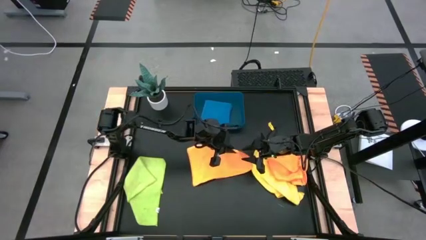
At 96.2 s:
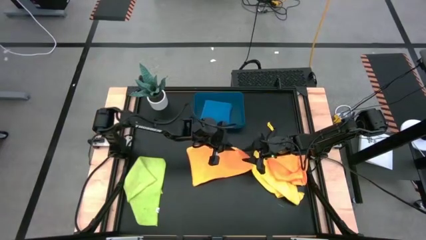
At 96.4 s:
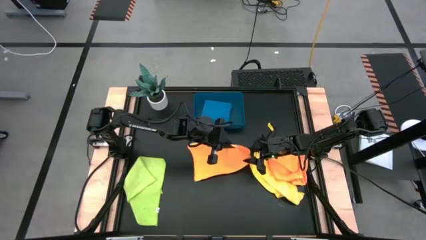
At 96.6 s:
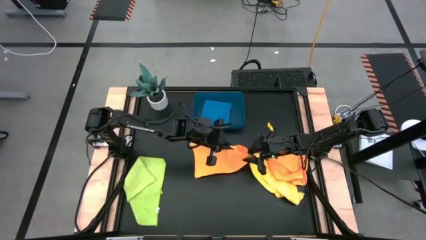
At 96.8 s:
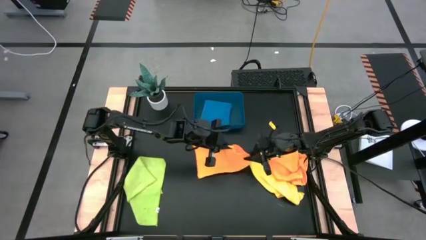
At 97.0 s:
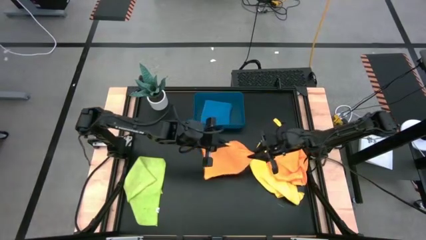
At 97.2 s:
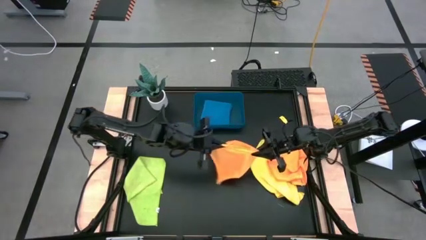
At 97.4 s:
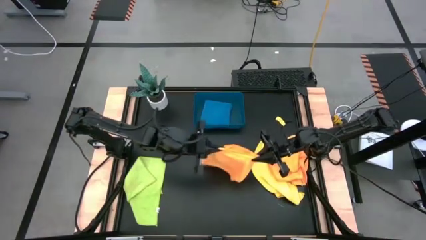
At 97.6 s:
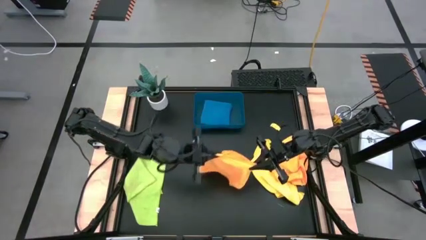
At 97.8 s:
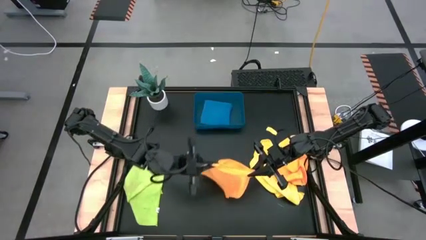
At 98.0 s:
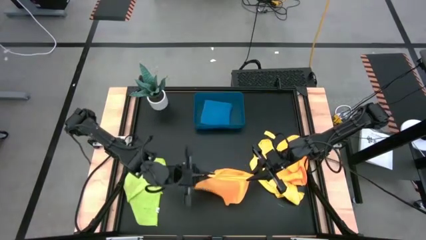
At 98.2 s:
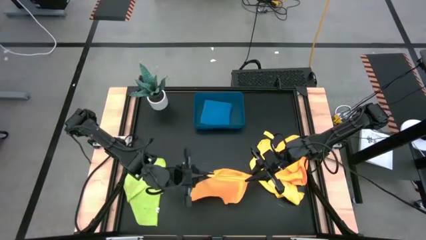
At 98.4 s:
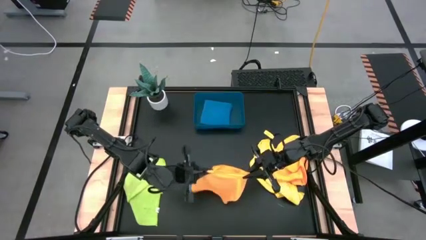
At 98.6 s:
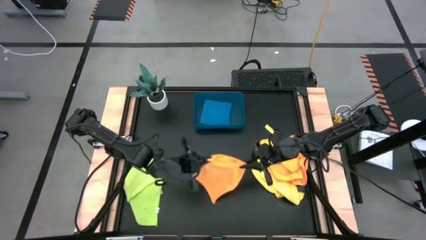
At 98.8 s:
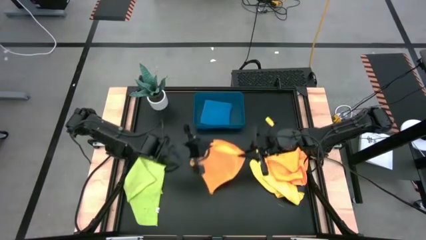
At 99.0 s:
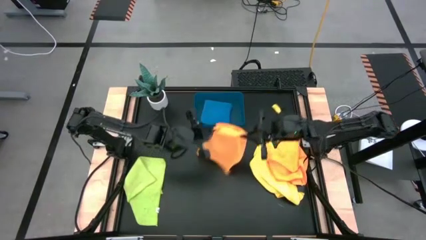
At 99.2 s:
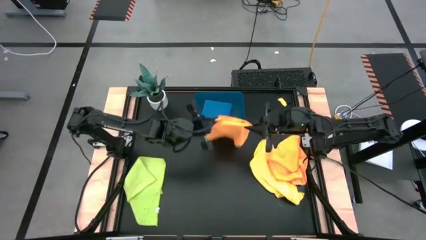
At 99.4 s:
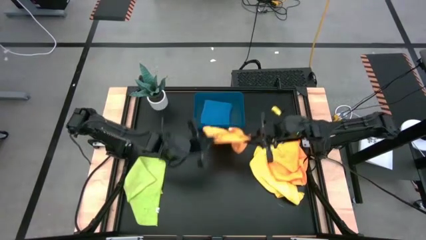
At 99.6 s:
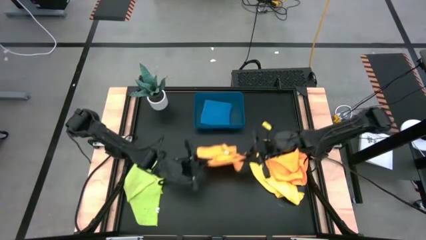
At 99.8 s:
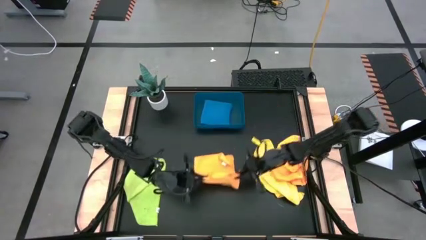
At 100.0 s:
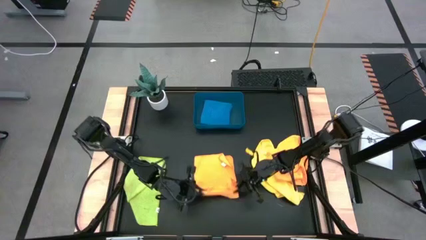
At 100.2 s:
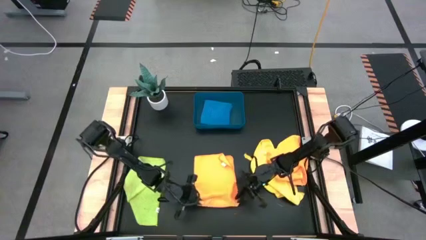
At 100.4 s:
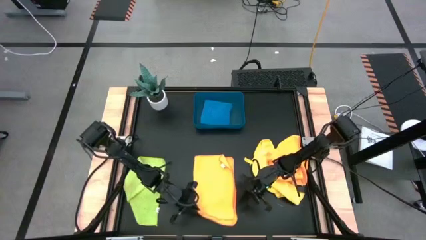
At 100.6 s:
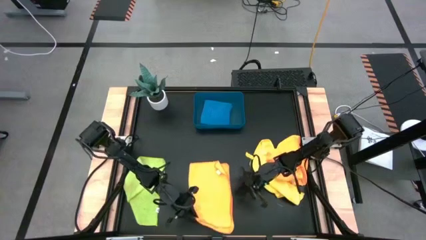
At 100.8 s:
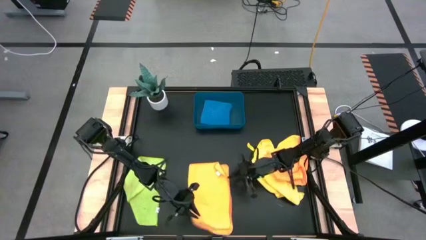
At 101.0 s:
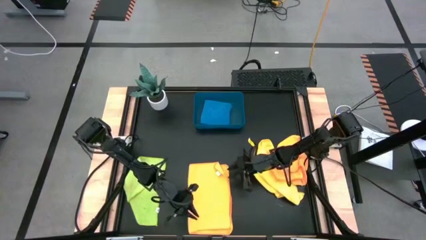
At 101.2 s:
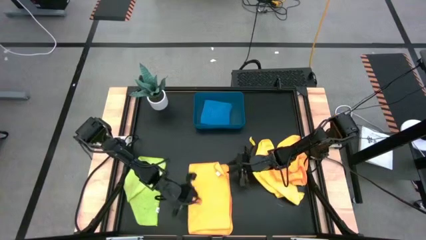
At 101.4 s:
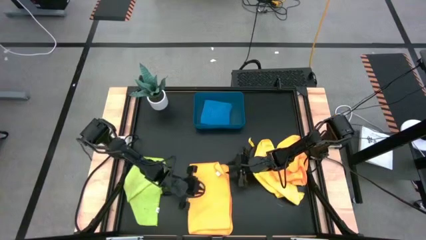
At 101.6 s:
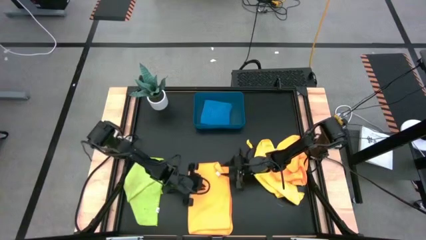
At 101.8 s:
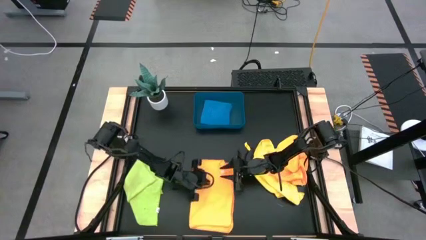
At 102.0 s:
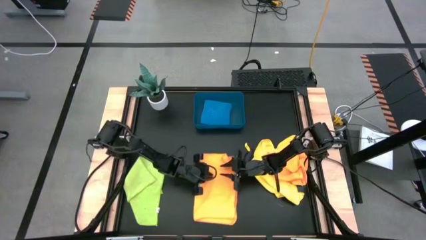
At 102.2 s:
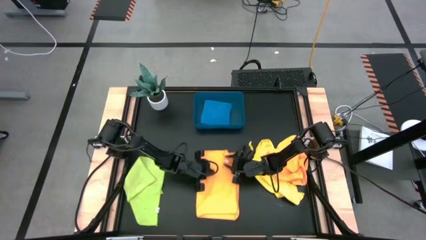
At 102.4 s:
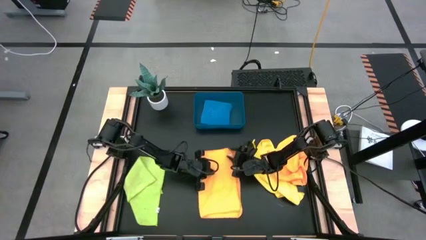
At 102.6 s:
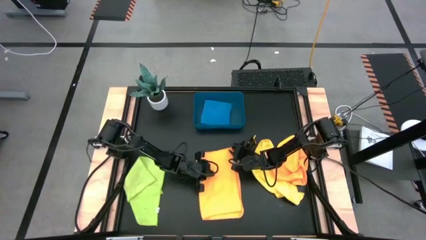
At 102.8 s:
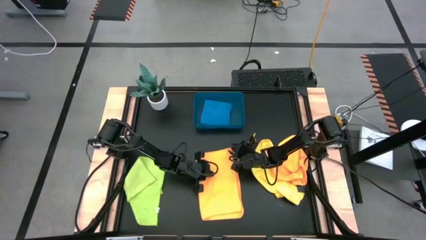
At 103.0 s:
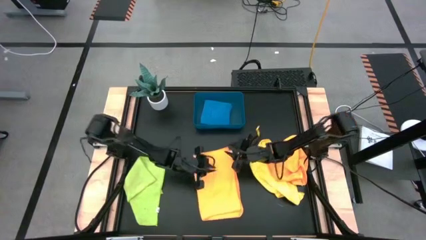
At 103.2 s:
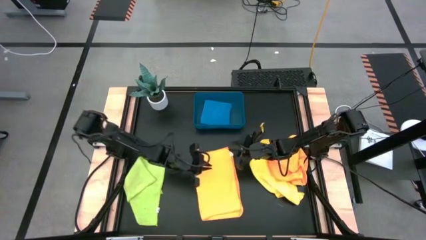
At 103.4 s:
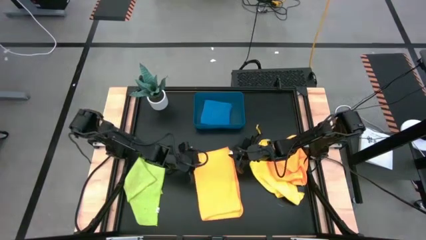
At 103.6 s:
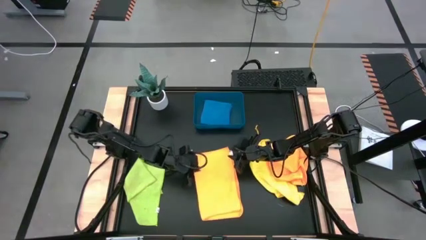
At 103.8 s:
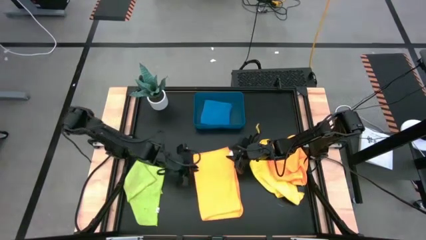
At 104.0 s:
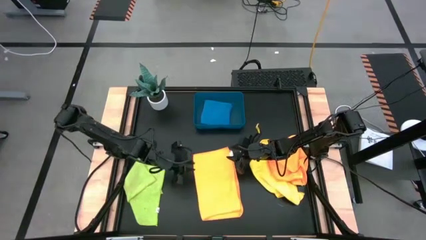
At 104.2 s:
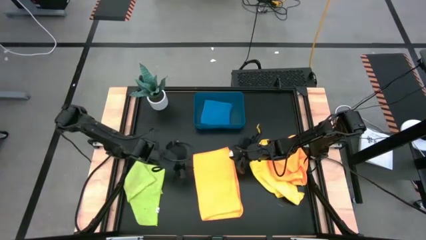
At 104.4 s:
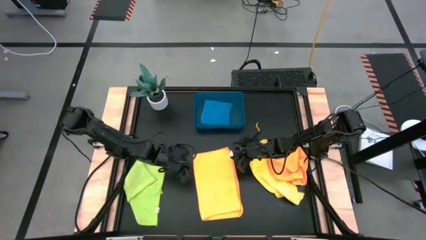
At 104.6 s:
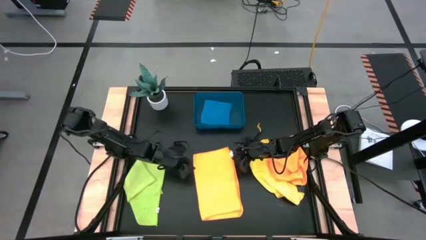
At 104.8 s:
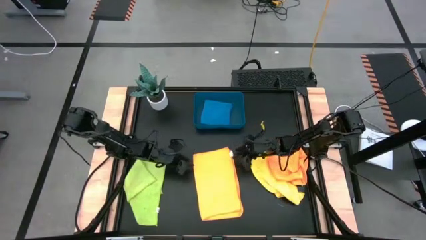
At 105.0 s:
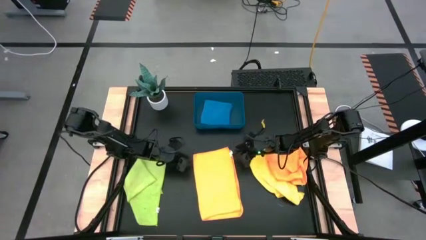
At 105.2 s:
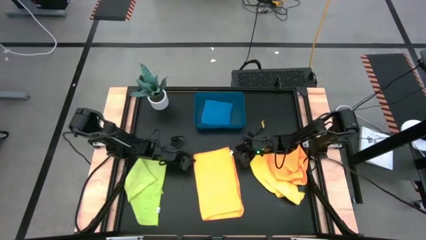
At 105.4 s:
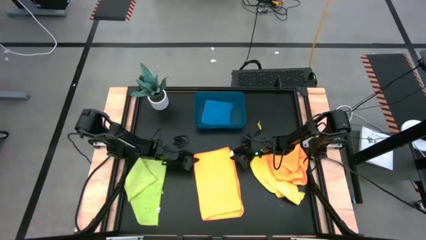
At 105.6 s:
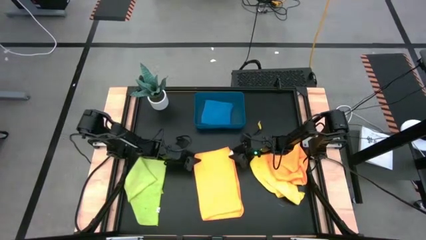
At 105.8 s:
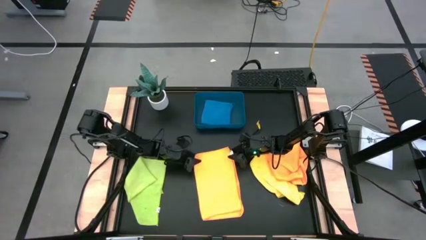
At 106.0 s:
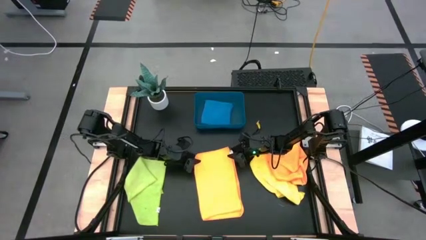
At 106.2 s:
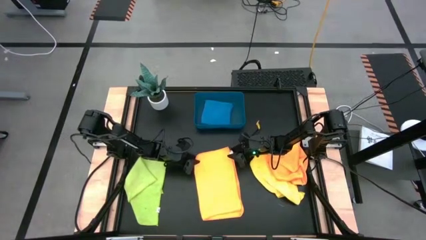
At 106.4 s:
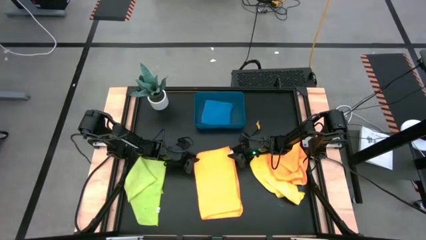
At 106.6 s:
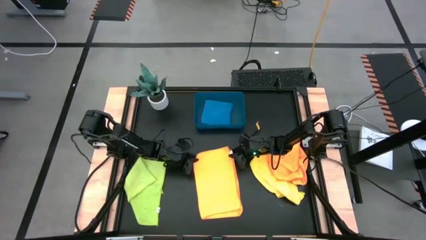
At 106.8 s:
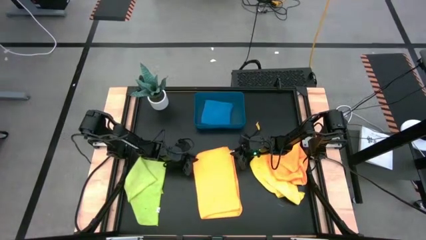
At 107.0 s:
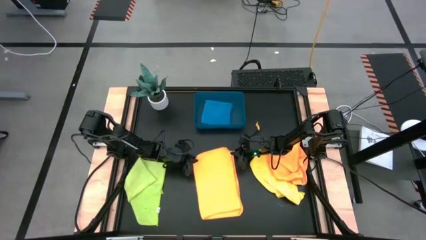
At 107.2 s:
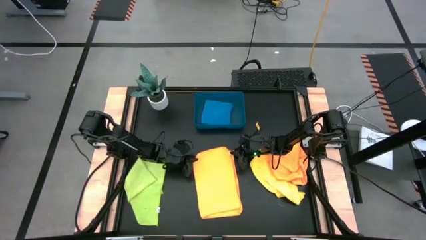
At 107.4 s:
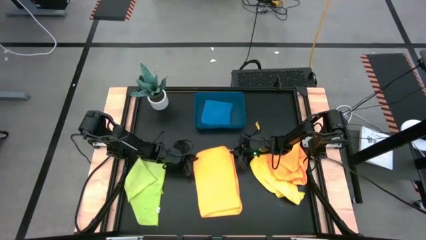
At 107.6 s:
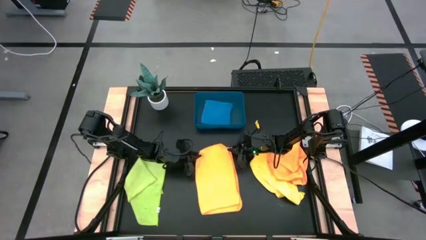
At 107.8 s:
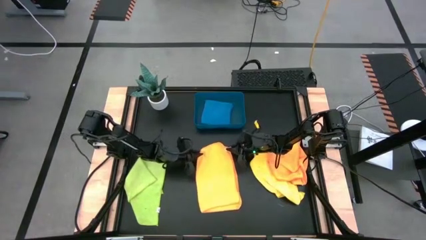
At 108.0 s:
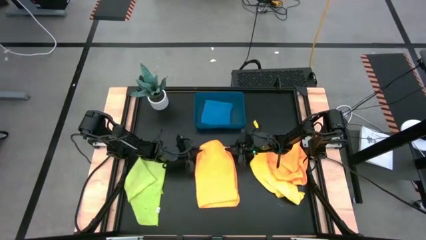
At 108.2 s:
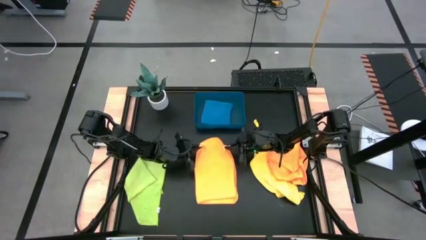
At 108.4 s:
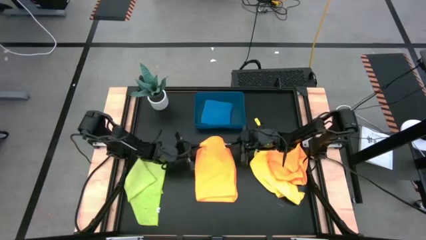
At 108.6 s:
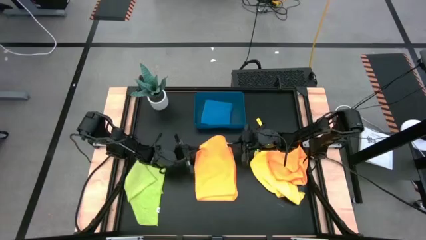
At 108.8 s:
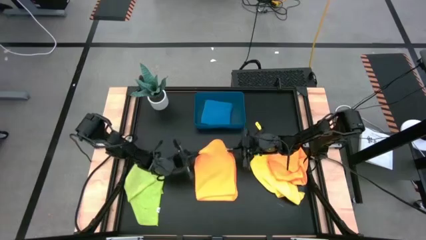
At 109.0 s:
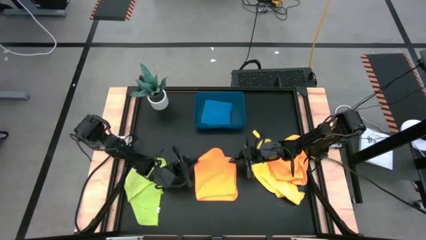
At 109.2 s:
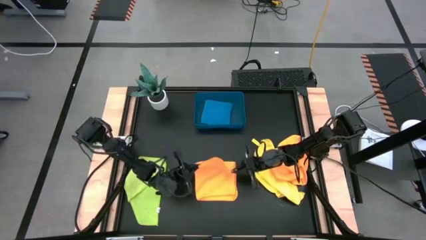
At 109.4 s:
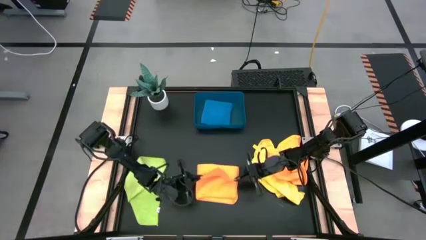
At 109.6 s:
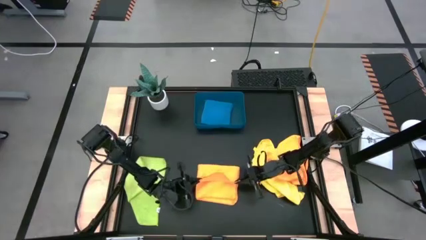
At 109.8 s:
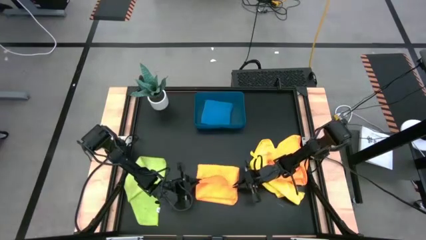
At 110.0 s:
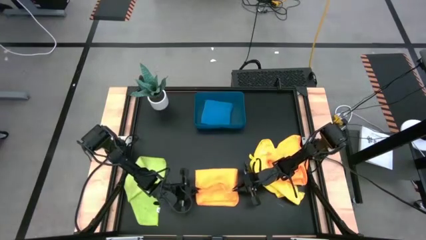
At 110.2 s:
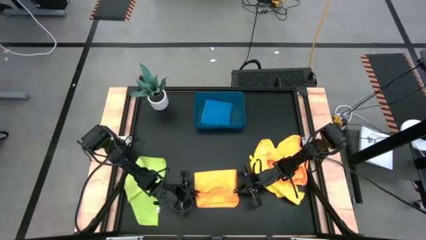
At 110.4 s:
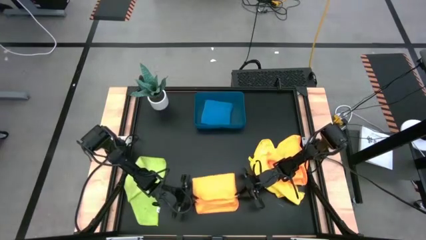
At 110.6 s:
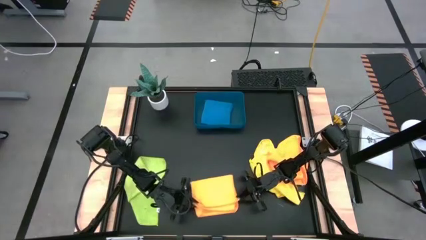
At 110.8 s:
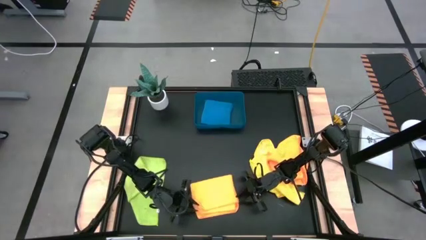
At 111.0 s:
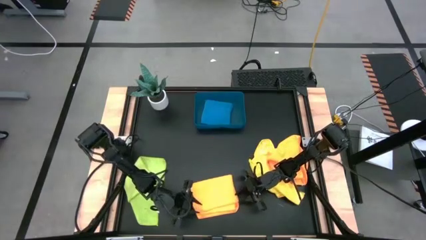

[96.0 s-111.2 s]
Task: Fold microfiber towels
Fold the left orange microfiber cloth
